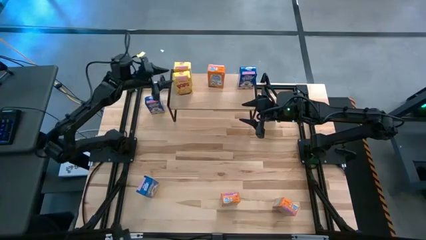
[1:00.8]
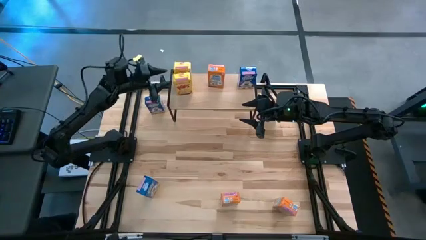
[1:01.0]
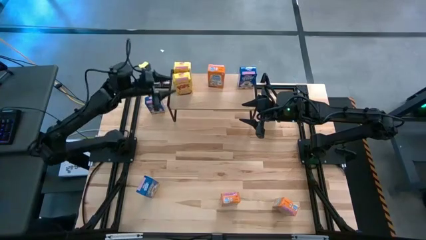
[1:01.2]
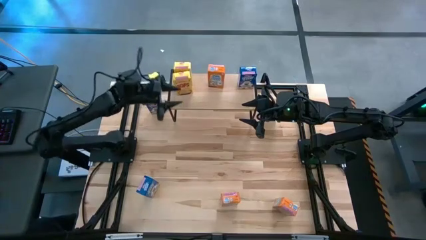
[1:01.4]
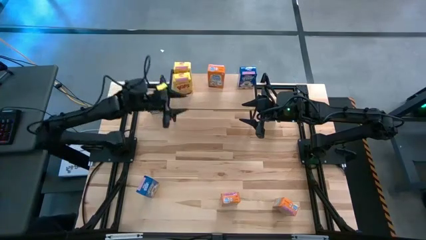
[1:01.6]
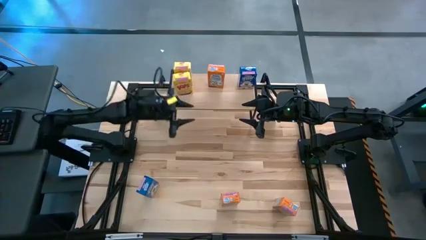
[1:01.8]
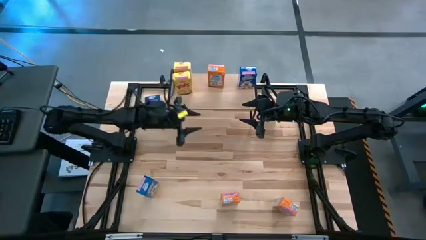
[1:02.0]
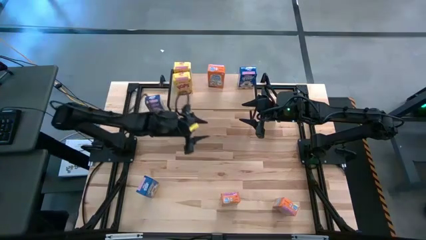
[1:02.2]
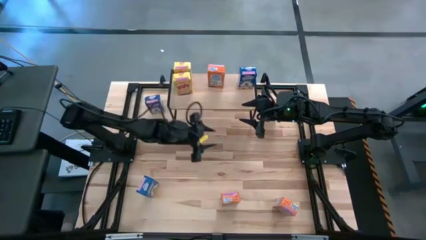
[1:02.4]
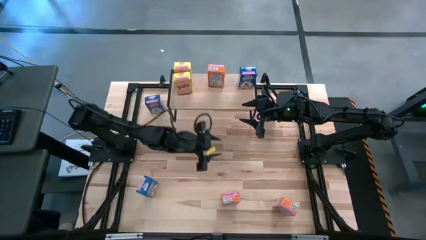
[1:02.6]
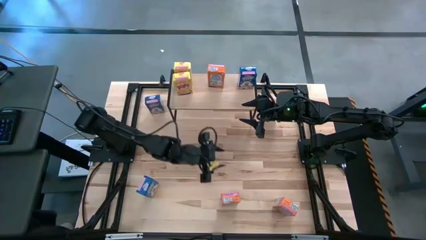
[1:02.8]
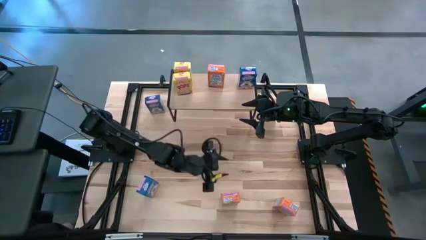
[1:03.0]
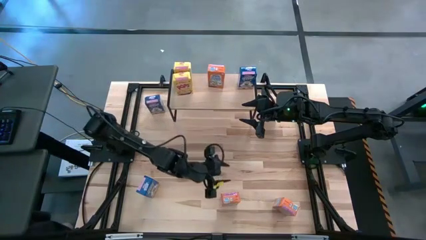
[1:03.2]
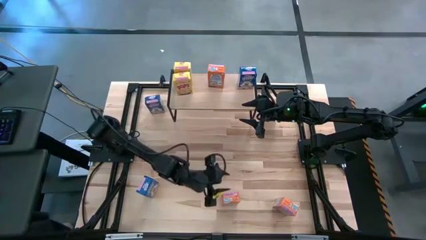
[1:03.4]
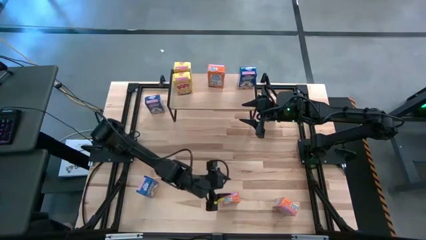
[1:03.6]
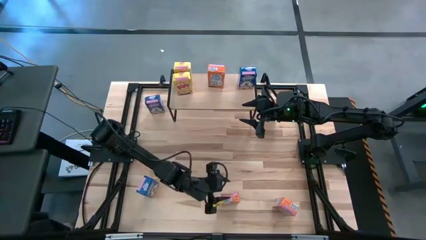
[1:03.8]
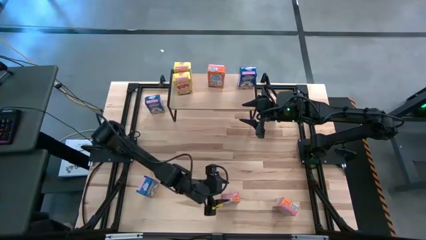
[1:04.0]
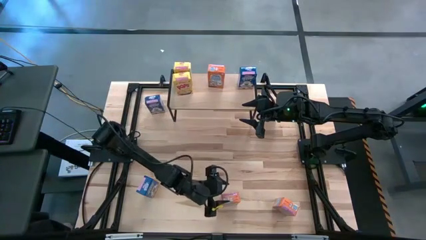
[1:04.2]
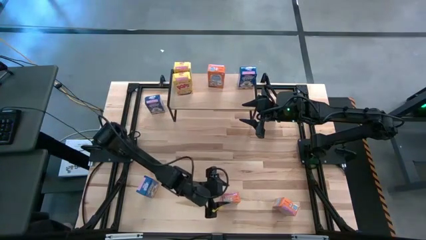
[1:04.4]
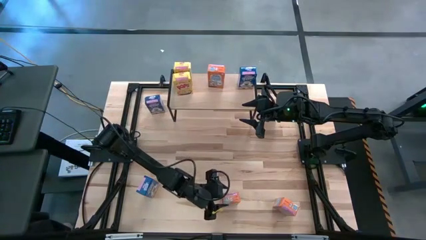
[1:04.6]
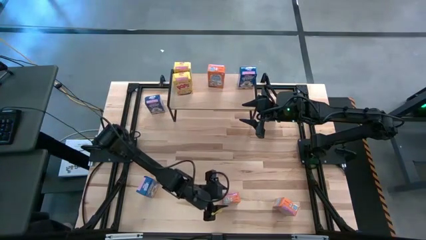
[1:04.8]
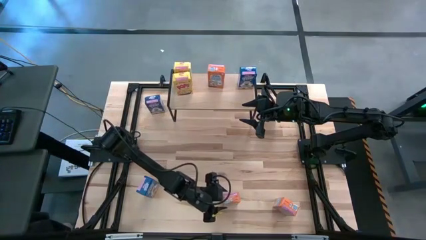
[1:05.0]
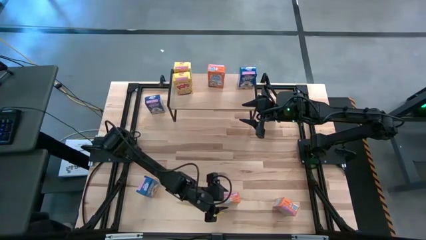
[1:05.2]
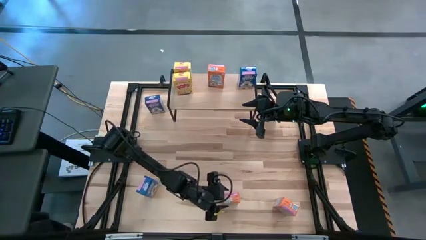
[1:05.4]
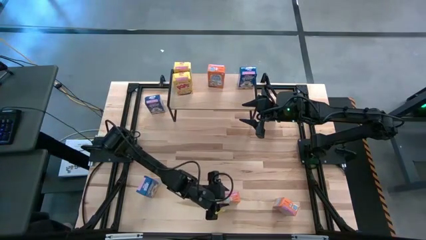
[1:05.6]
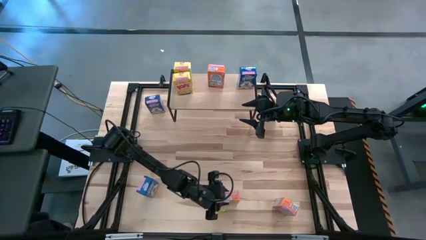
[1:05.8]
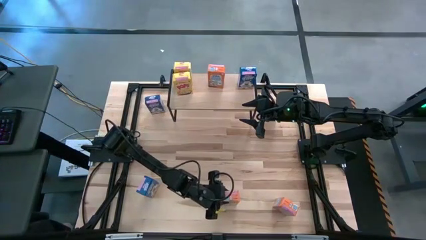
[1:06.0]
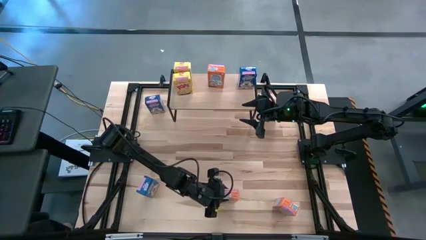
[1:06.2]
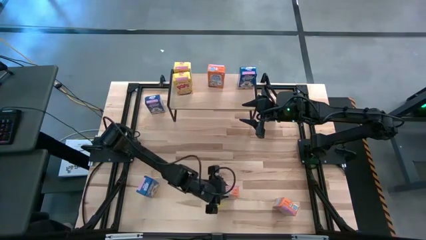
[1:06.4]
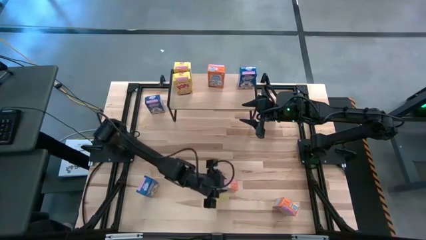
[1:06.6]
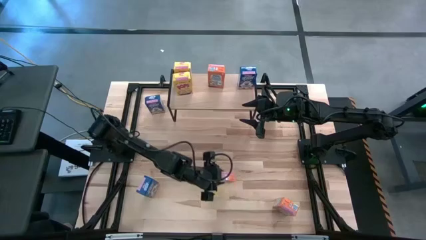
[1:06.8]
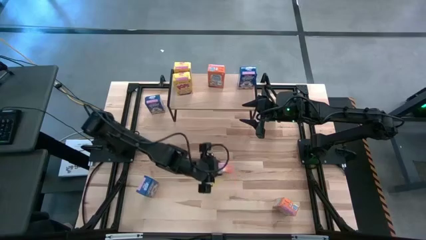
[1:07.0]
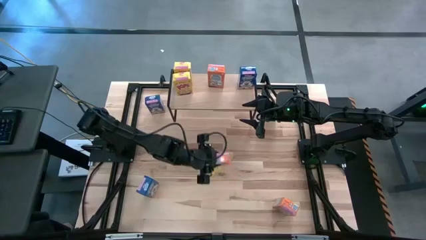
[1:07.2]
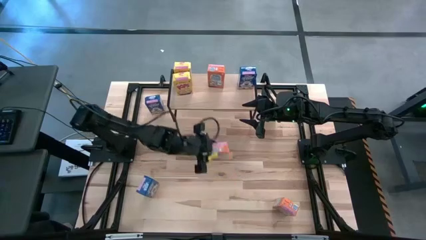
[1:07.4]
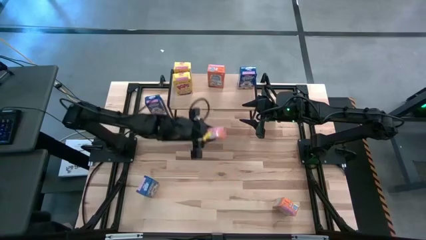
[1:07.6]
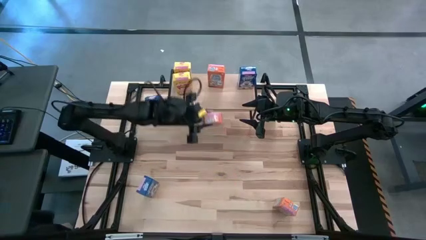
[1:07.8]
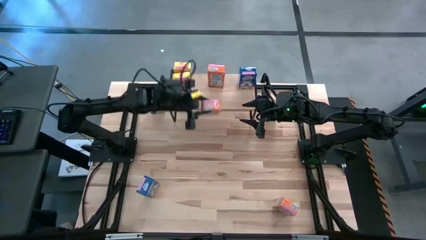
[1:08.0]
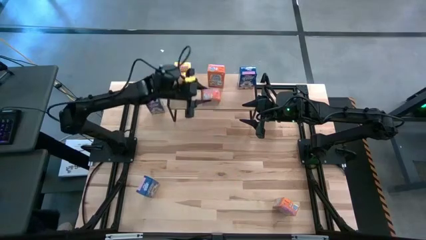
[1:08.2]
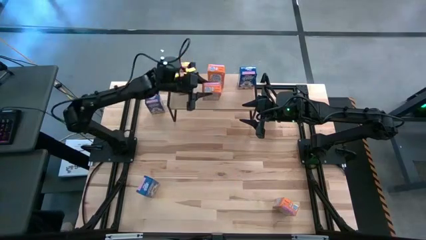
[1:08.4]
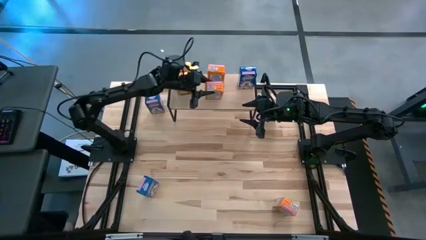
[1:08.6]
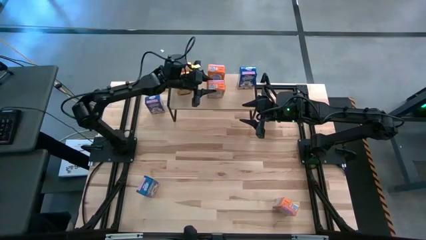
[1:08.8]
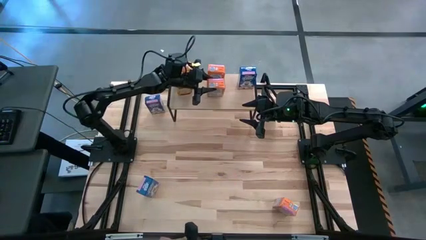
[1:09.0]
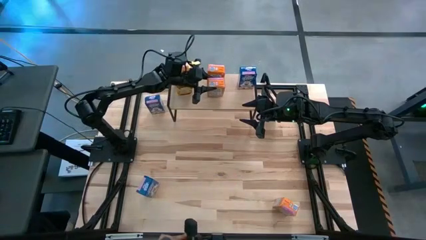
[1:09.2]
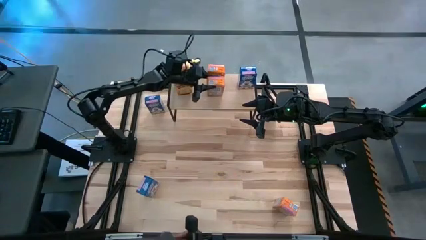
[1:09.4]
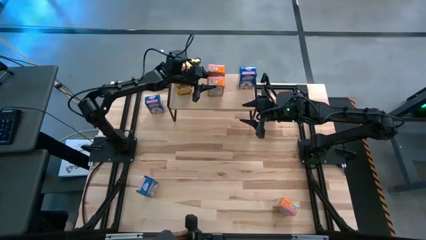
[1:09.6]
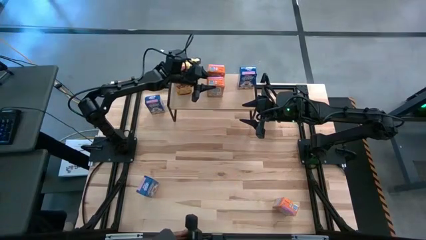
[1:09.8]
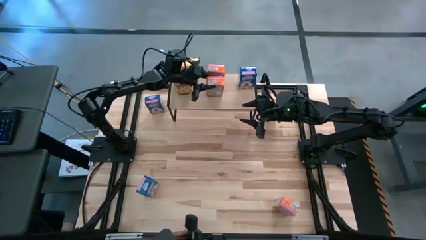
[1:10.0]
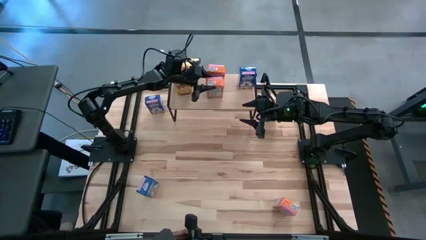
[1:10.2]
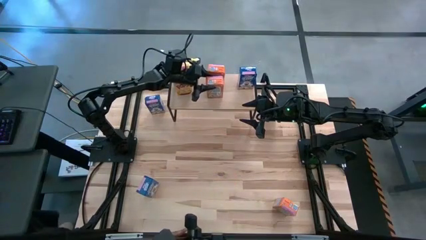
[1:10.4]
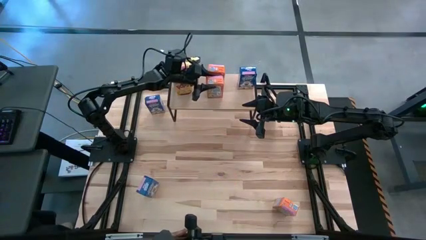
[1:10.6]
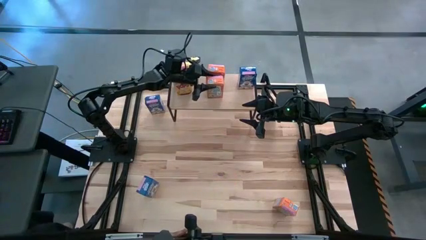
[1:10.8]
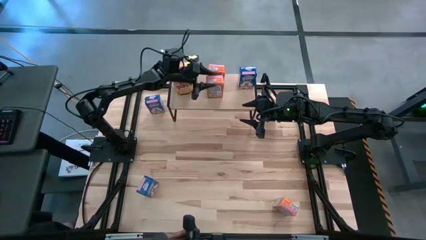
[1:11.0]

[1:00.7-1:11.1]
Task: Stack cereal on shelf
Put the left orange cereal box on the shelf aligned with the other orange cereal box
